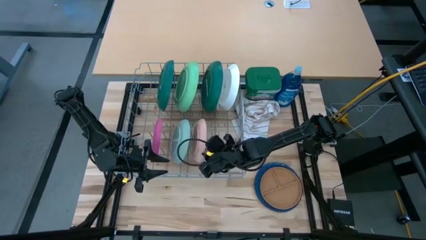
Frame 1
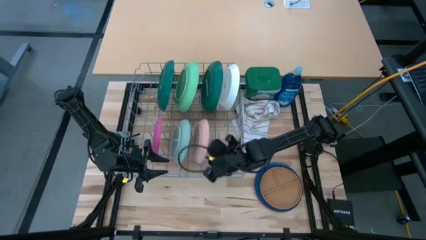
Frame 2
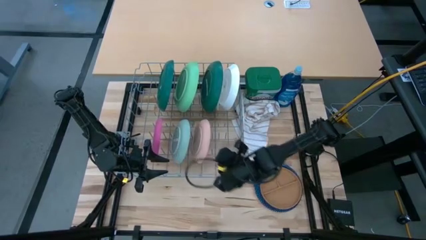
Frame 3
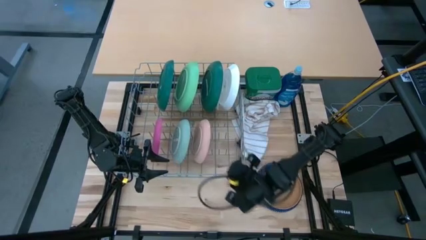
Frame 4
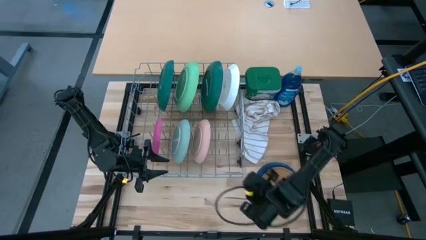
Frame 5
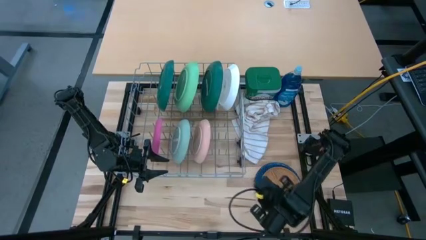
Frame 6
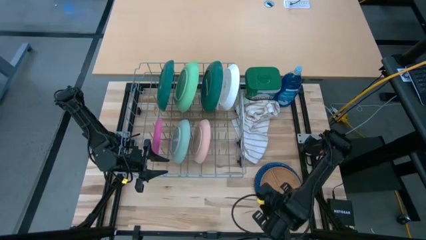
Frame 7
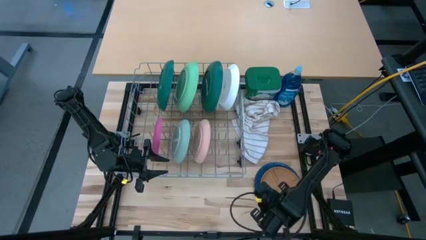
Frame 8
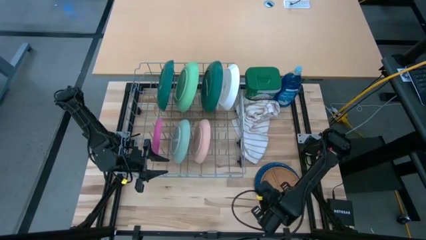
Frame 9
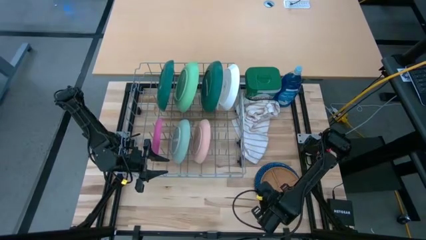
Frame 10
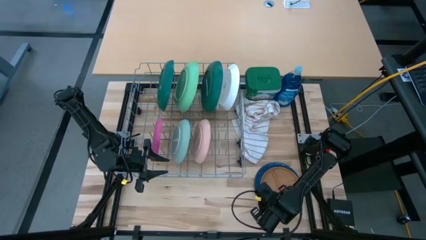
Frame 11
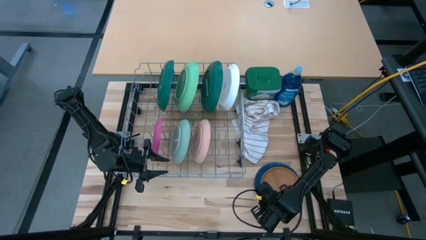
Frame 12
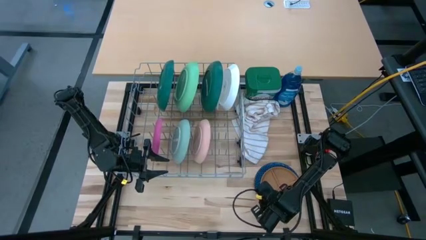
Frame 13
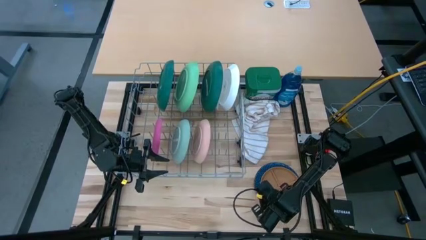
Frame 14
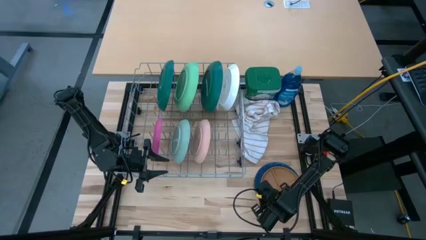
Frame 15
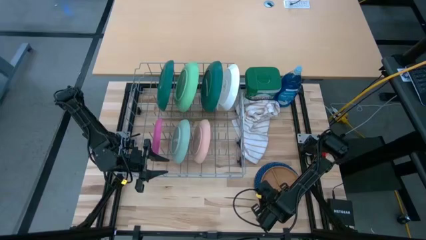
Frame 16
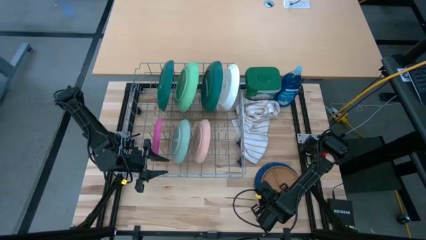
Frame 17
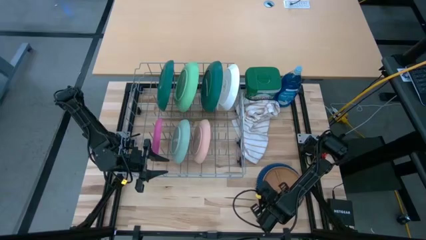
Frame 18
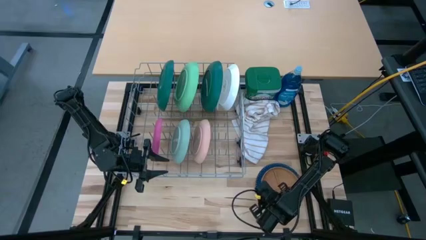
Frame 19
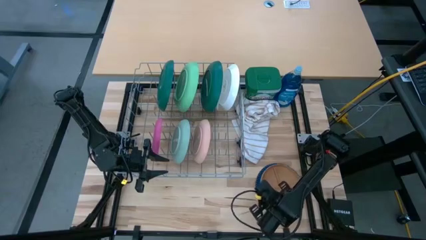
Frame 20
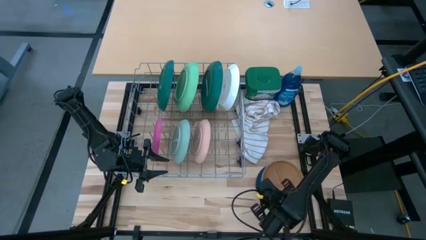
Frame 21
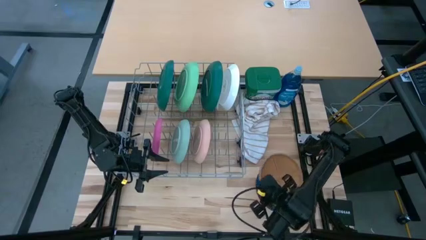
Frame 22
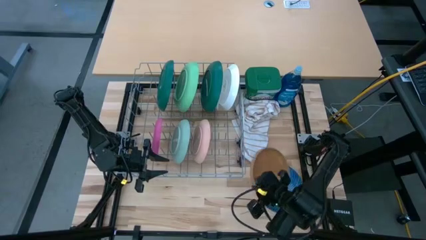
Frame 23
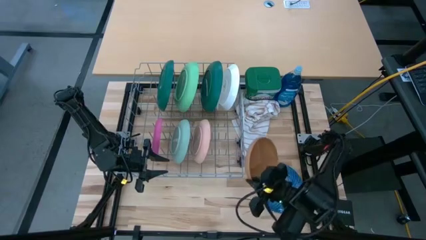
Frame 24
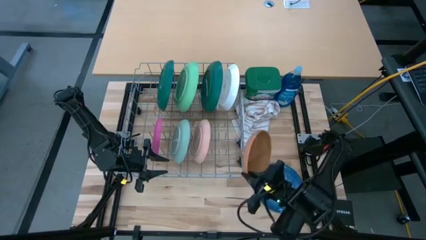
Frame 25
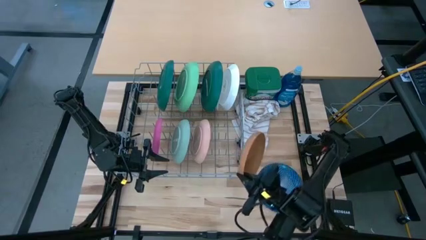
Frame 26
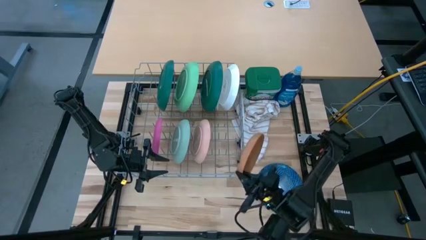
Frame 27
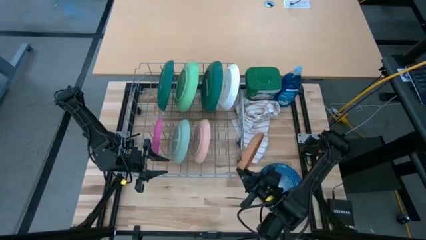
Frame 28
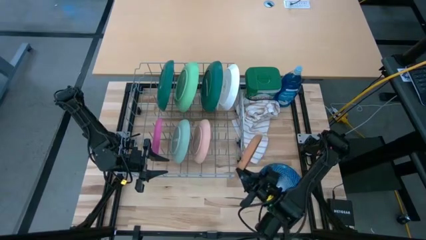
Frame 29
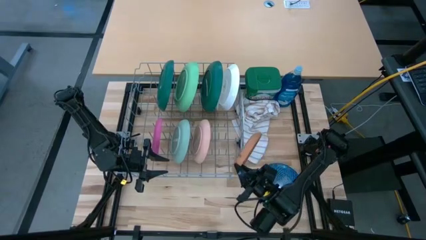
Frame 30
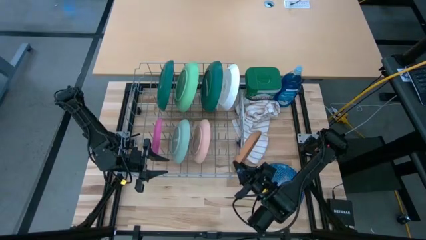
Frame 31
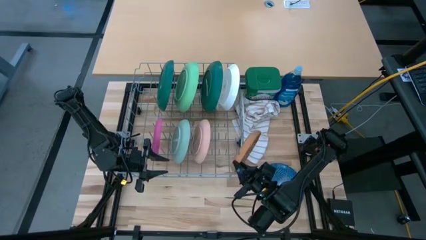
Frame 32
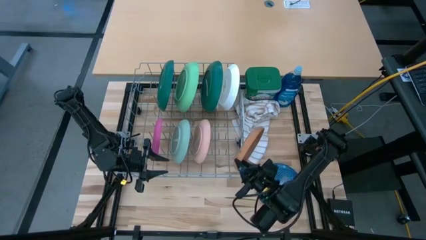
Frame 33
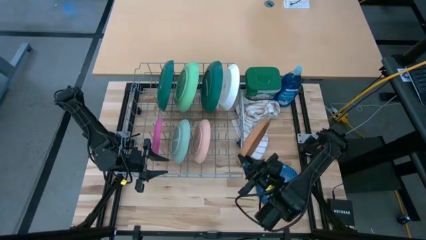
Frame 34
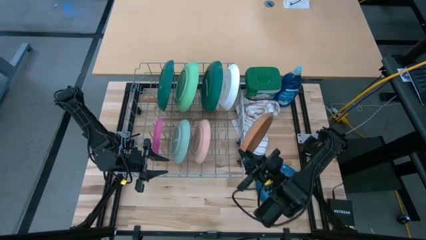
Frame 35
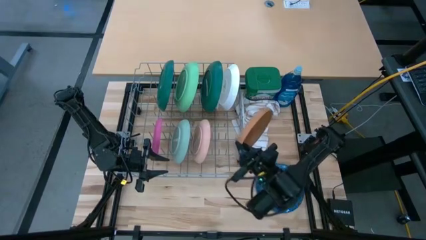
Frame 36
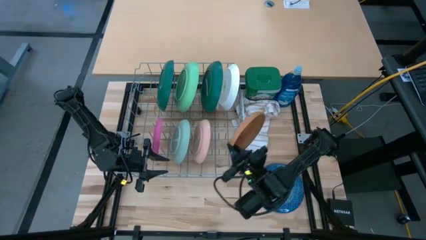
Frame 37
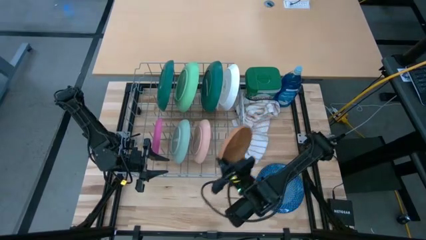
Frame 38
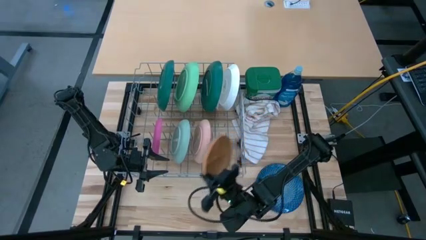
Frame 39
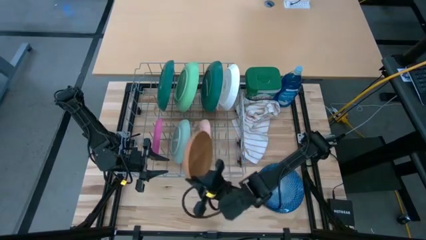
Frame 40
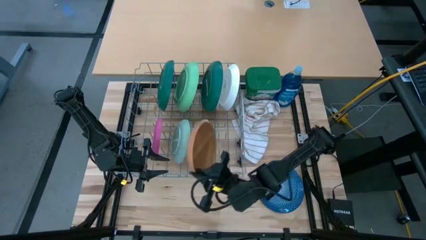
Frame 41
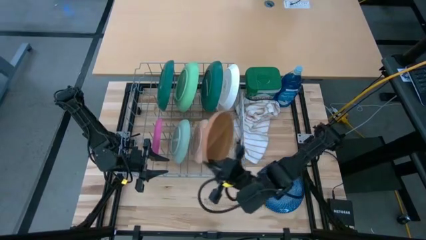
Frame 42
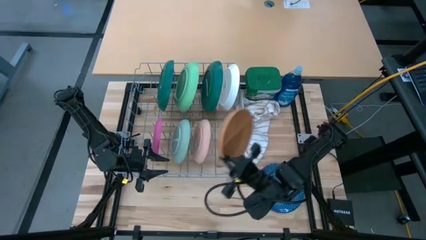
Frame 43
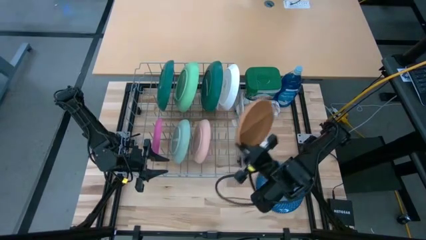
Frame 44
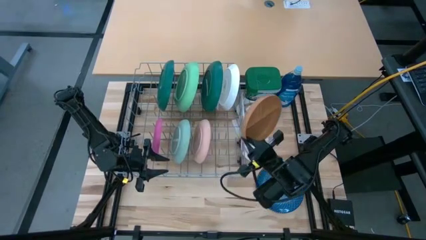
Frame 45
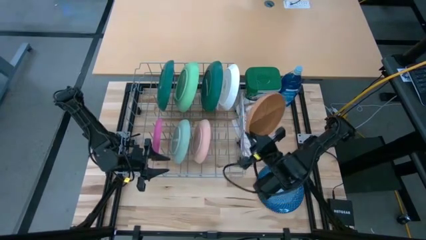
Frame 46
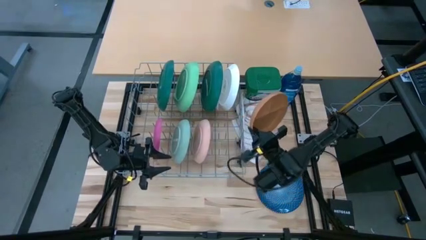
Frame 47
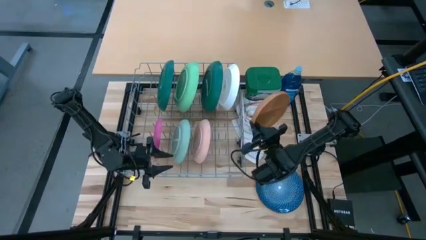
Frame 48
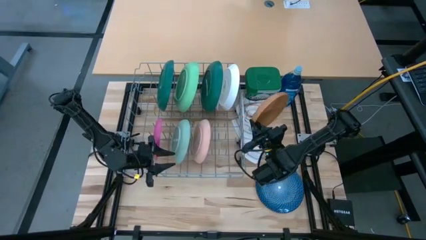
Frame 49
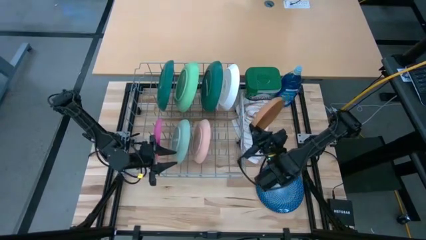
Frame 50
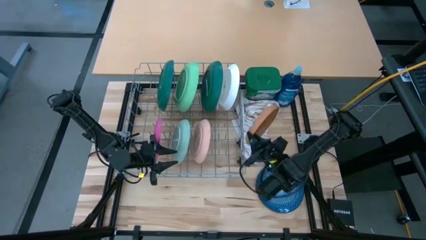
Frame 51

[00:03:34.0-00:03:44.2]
Task: Sort dishes
Put the brown plate in the dish rack
